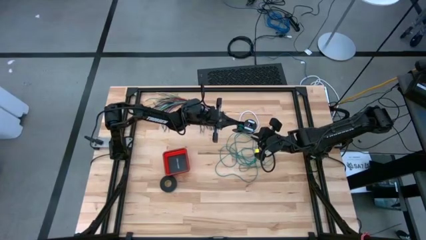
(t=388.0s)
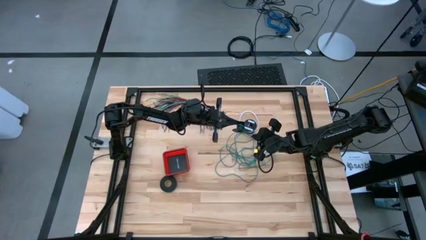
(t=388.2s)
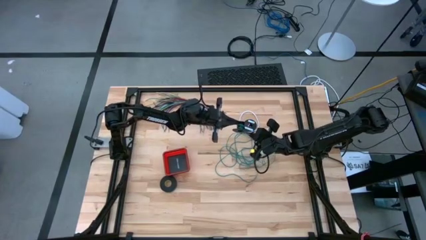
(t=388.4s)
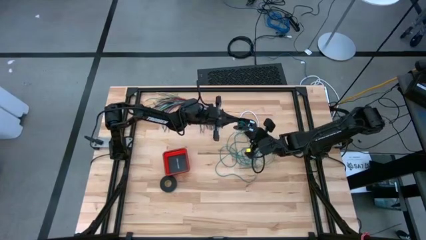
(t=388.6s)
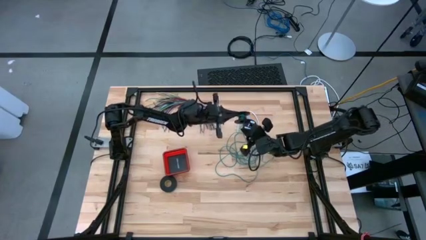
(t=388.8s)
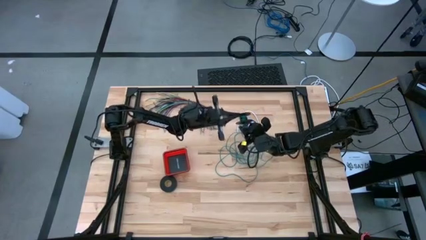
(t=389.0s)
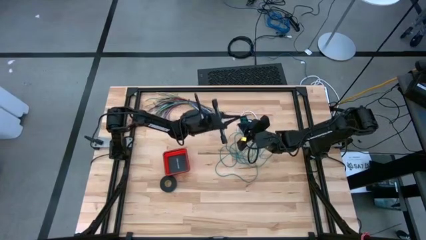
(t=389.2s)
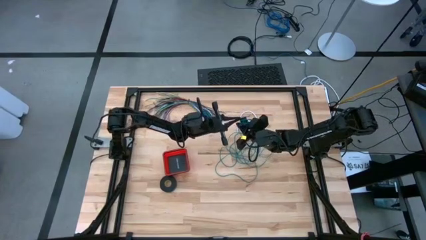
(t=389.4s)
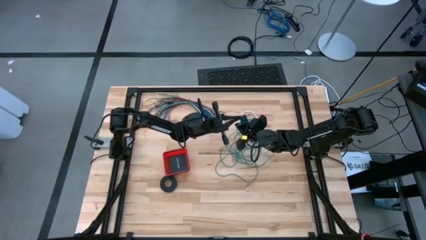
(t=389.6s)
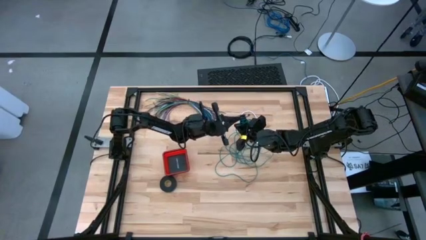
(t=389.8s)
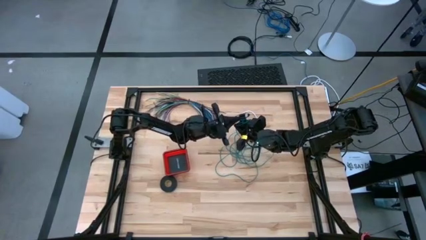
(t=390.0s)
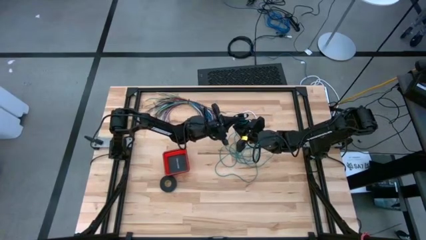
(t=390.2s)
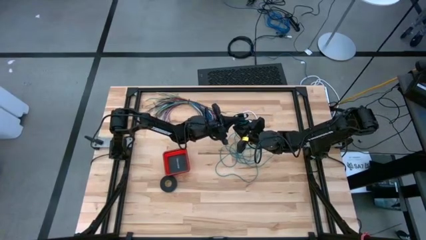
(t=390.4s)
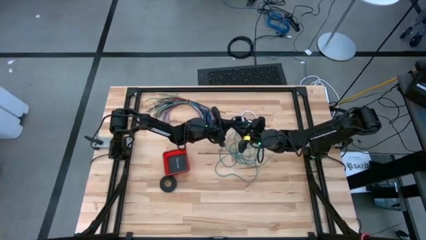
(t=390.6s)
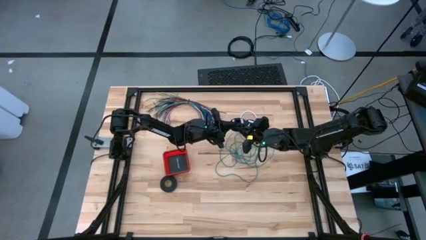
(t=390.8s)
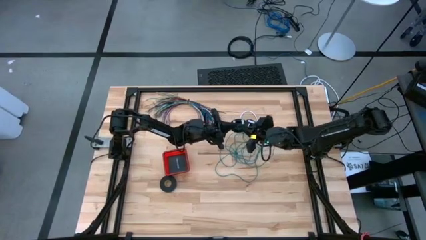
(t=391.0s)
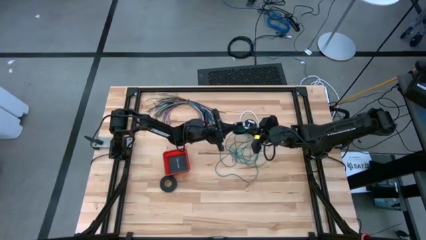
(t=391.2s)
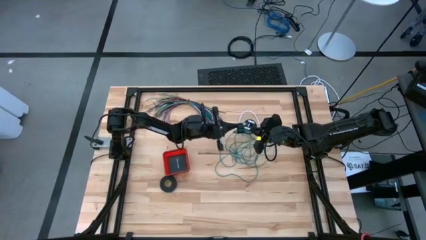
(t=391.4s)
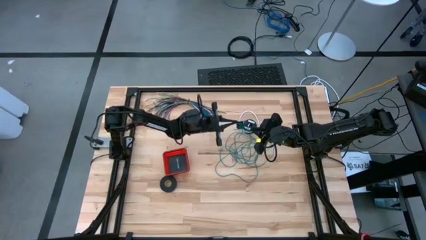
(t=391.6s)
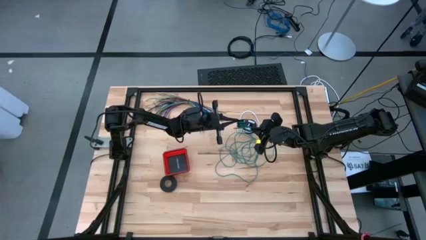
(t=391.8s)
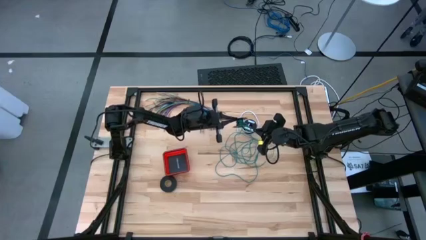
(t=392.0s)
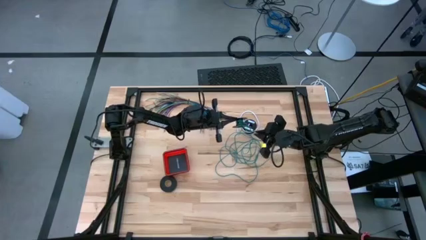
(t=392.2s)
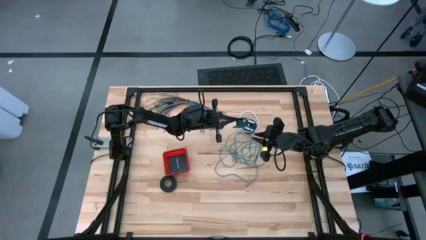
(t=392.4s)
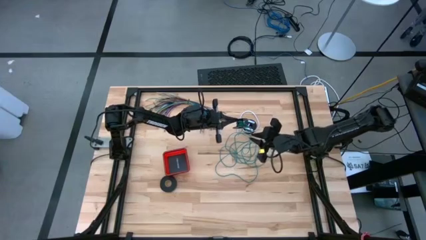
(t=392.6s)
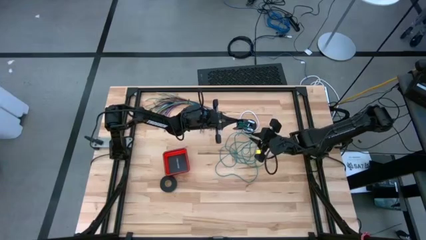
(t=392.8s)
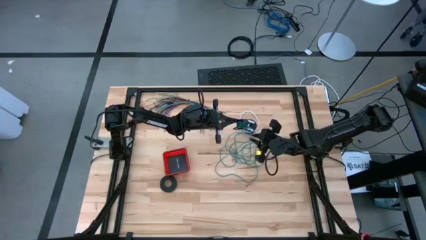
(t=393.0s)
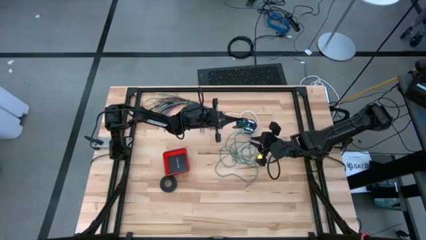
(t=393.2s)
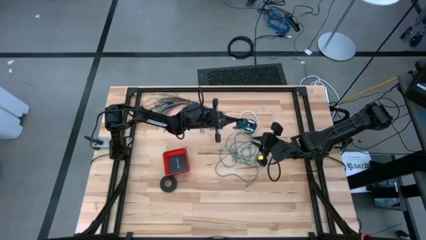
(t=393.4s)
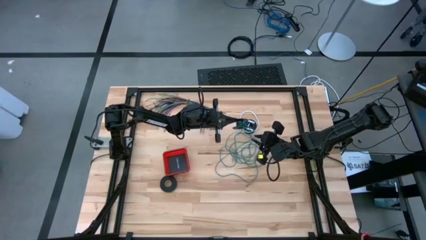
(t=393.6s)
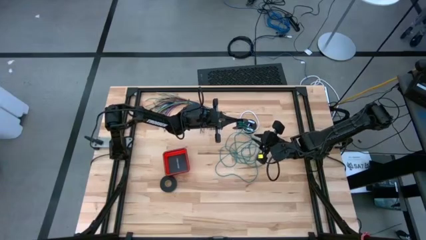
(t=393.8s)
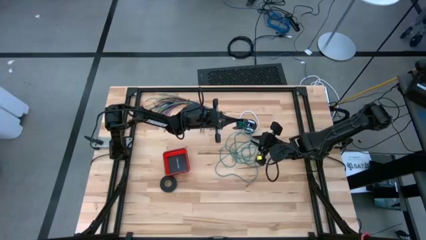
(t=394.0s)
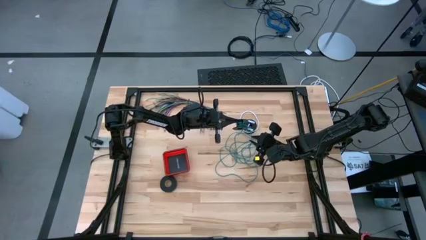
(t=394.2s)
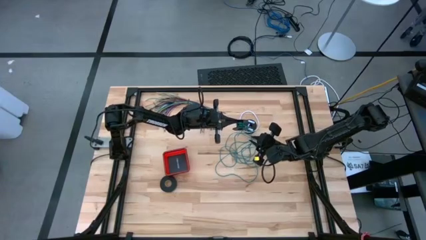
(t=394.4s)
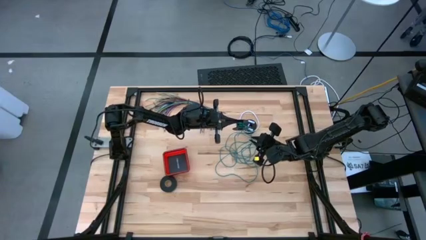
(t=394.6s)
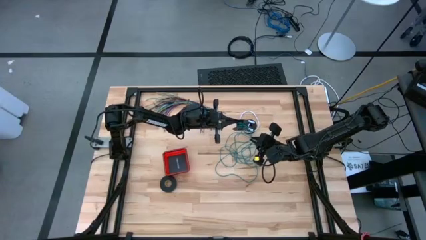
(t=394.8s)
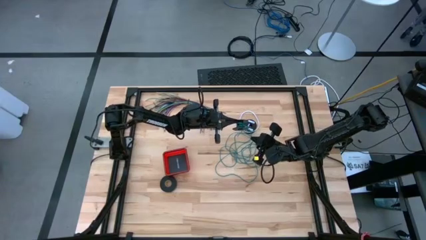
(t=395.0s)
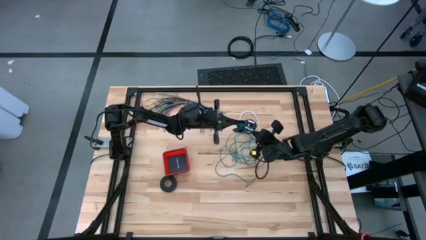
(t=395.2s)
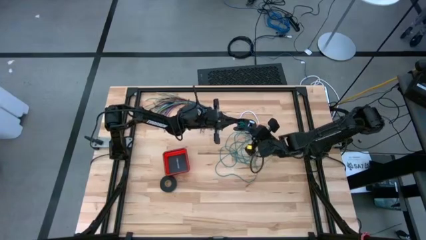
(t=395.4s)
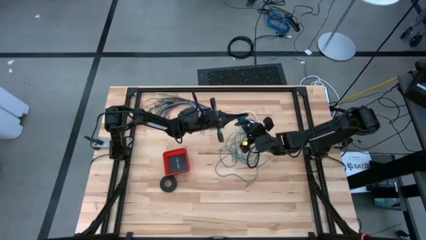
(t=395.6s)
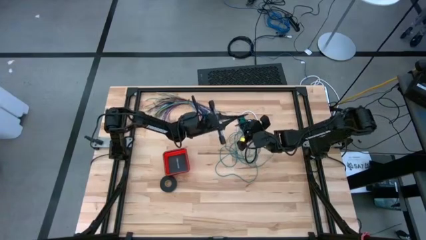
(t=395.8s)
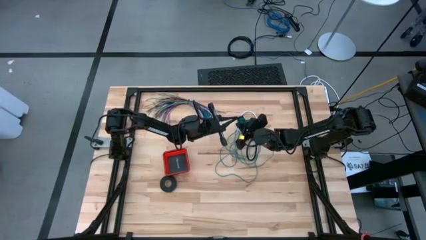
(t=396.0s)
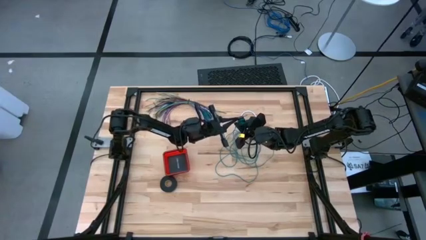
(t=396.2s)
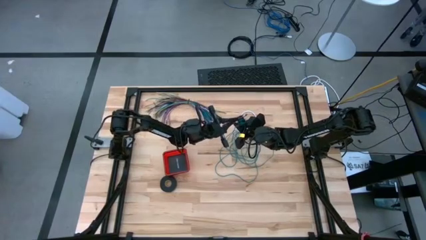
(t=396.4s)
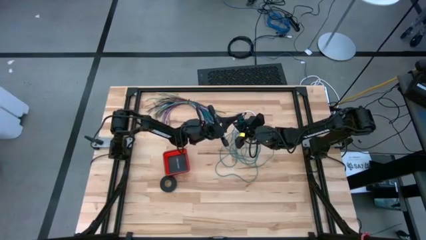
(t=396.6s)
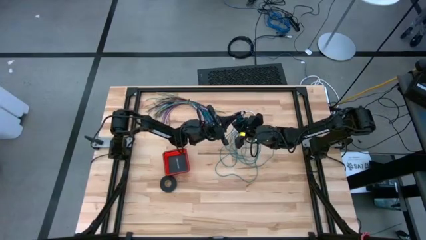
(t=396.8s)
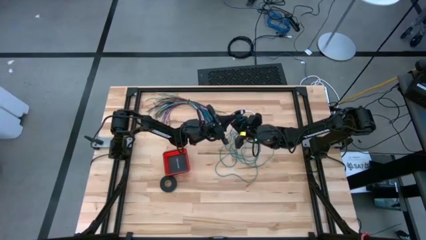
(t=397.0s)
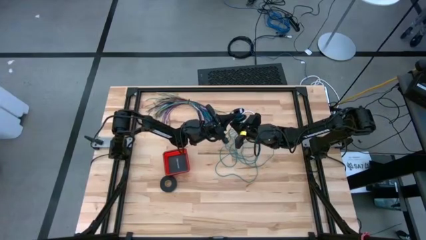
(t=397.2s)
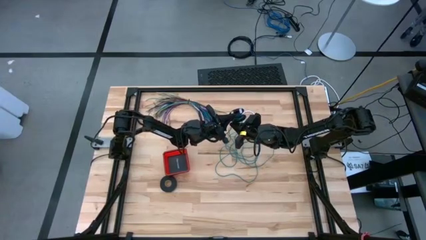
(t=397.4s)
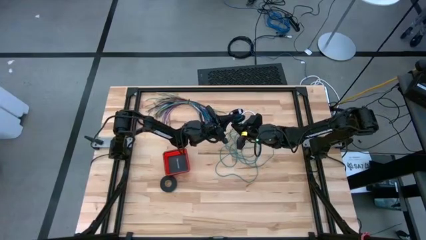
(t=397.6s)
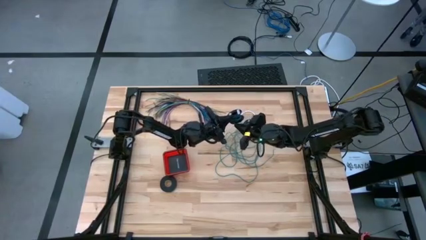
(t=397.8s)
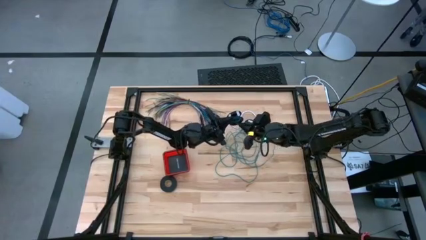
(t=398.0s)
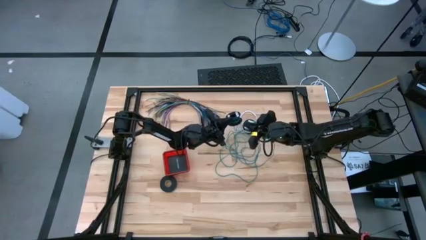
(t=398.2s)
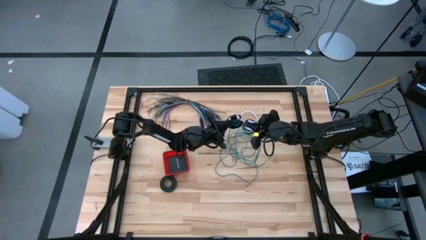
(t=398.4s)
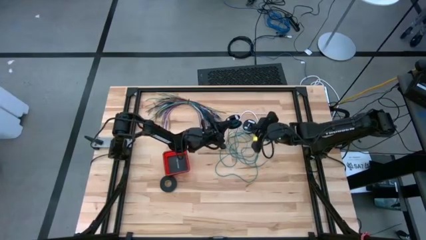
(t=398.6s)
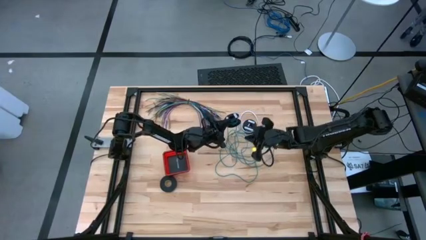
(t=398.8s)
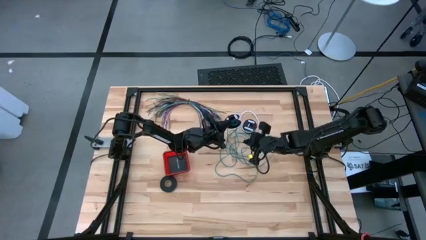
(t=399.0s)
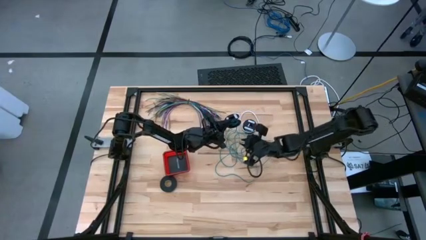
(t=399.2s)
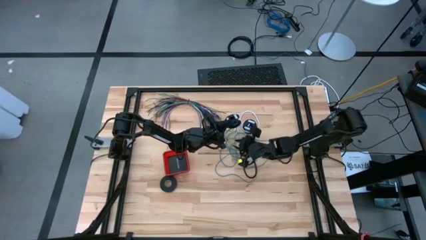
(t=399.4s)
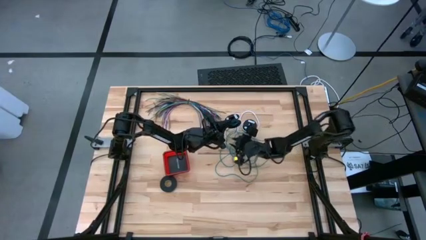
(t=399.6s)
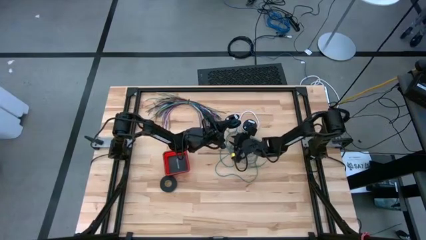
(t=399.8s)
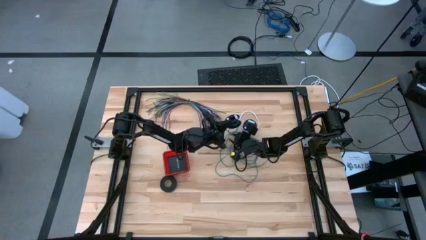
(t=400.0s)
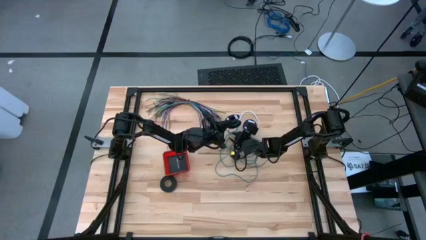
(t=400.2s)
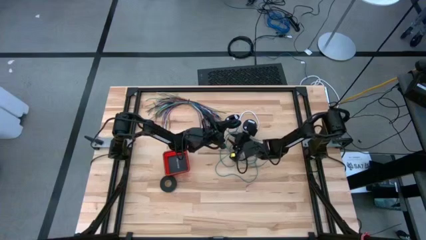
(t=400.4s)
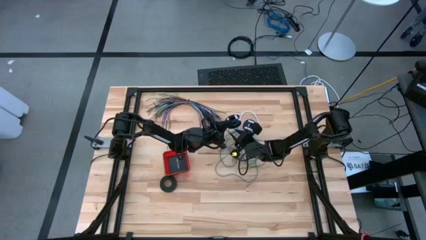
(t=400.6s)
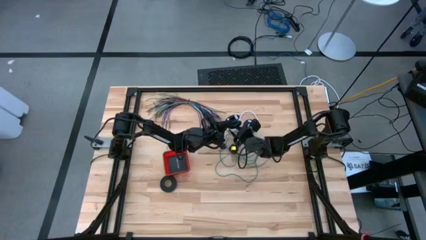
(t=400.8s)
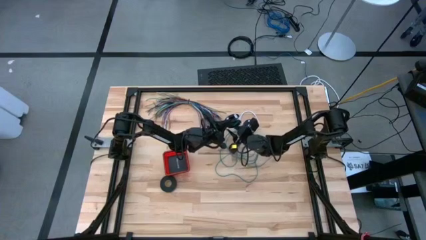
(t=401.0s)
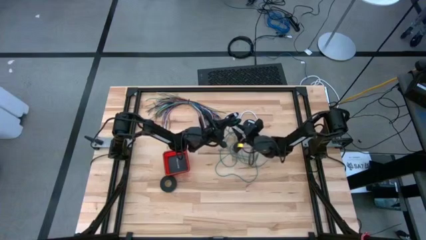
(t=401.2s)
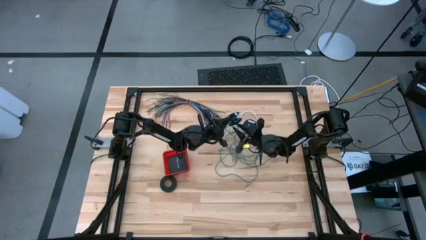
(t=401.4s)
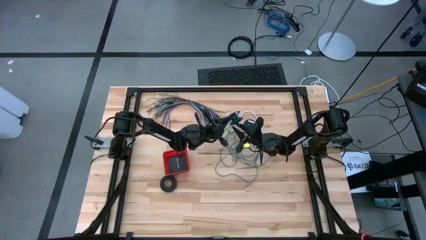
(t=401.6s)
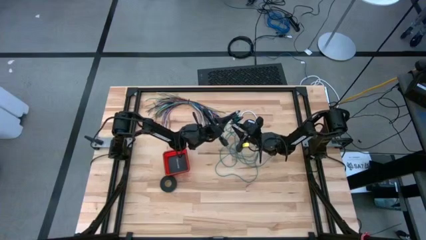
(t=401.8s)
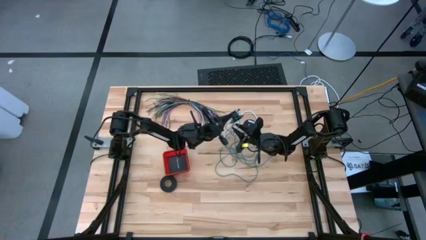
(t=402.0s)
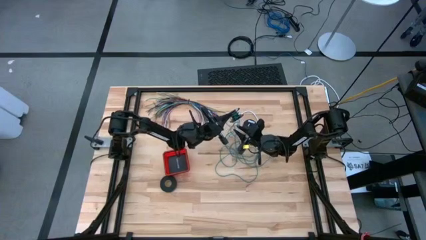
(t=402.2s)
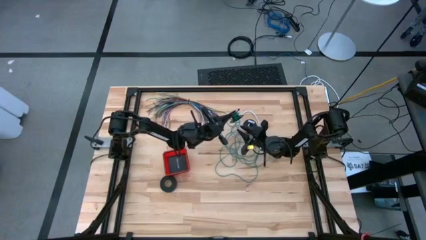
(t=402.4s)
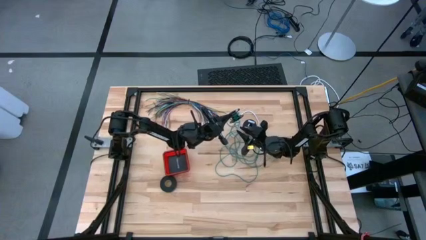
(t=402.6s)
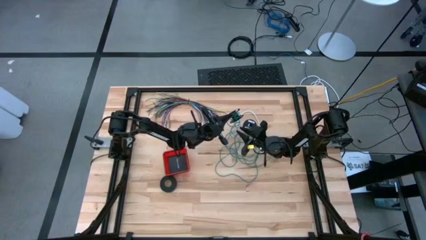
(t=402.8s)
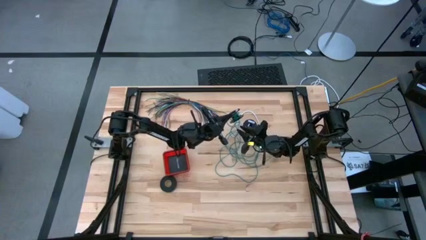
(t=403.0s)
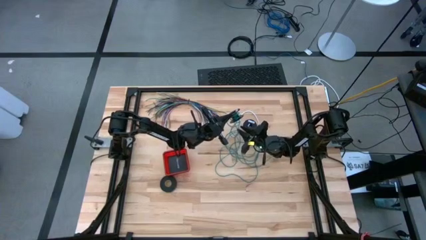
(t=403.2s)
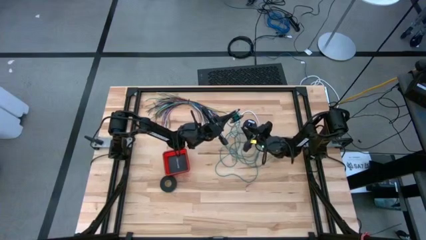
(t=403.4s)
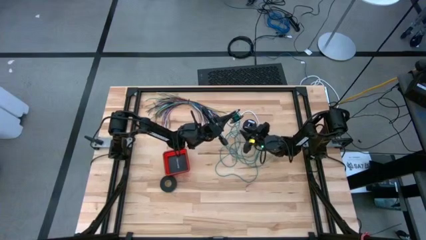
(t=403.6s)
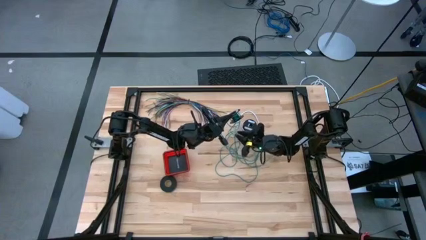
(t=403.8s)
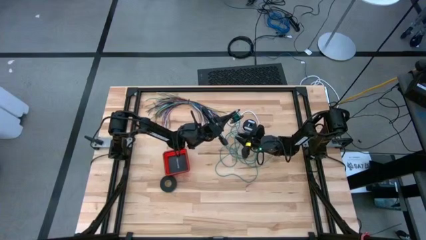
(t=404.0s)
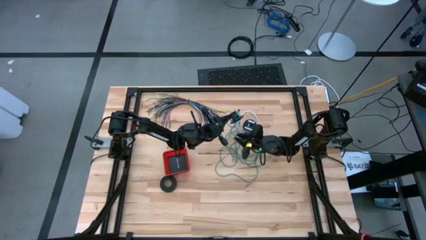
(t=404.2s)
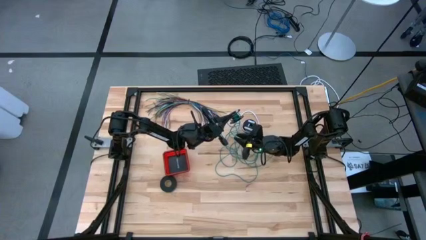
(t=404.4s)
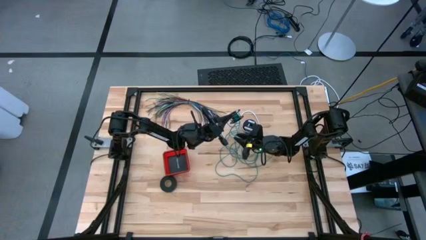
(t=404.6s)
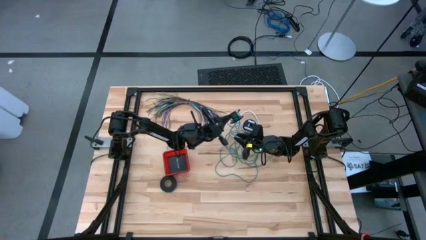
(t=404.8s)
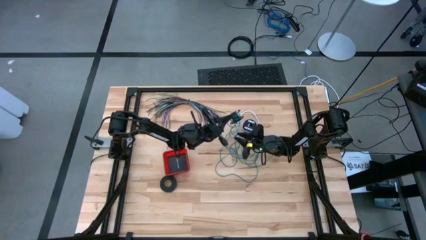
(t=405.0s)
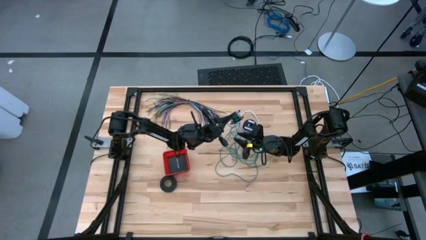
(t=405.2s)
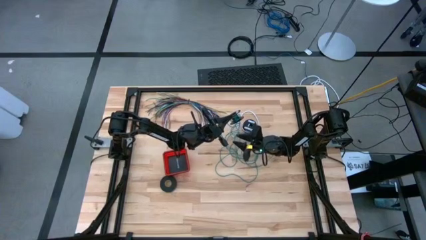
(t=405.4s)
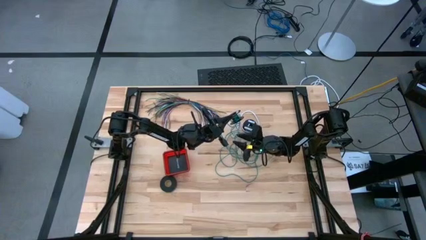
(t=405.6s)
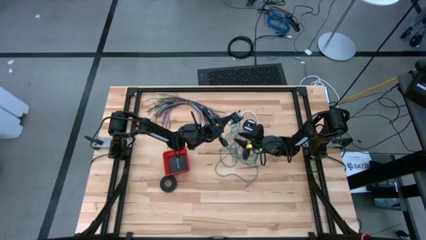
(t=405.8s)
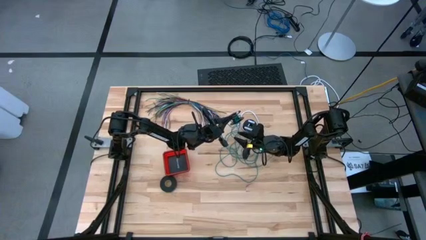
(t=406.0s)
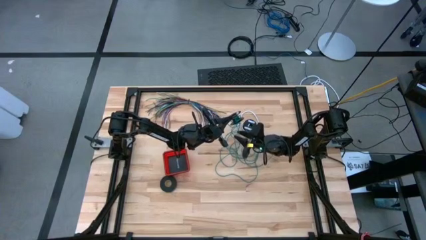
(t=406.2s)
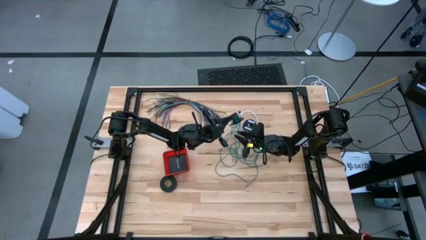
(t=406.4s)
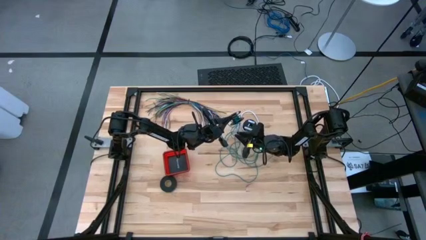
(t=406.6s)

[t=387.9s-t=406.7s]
Task: Coil cords
Coil the green wire onto the spool
